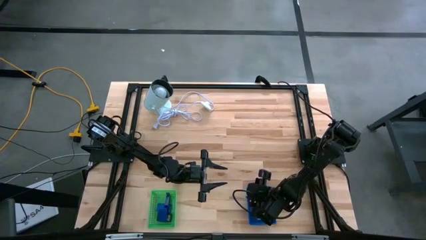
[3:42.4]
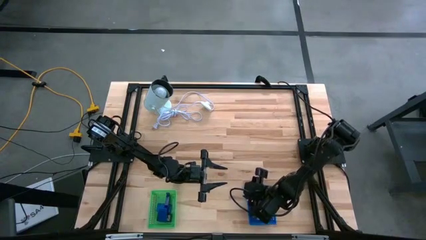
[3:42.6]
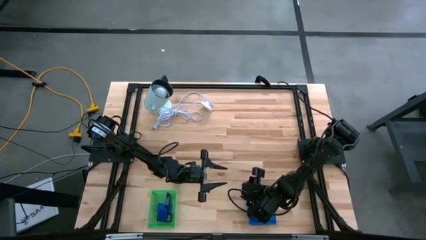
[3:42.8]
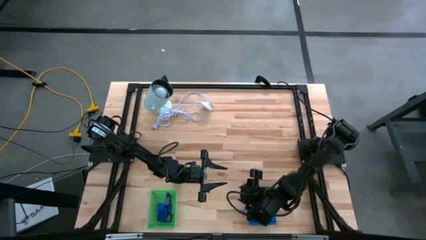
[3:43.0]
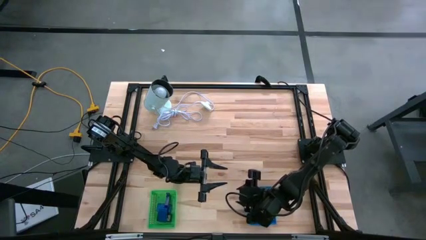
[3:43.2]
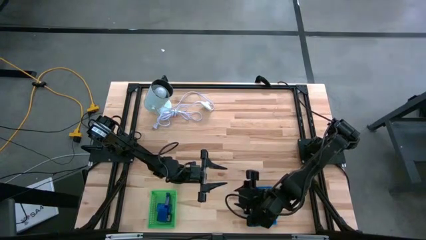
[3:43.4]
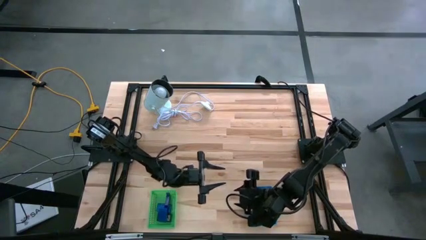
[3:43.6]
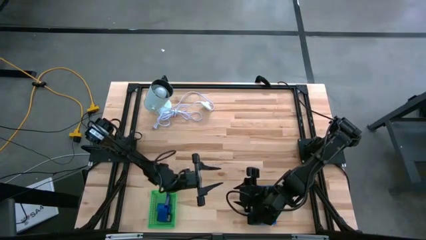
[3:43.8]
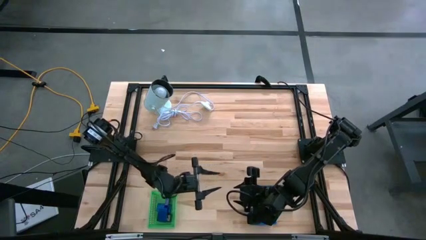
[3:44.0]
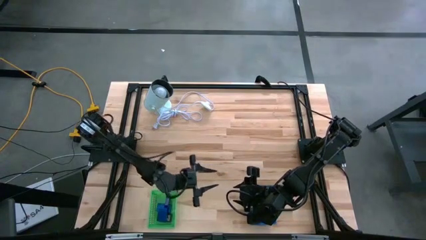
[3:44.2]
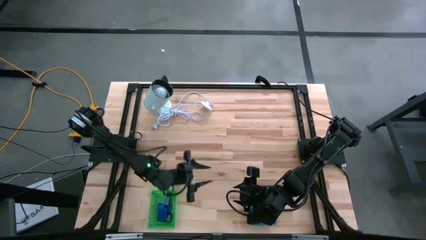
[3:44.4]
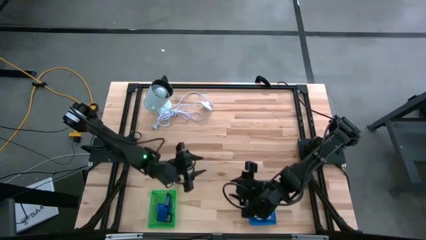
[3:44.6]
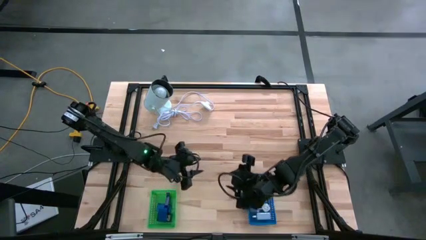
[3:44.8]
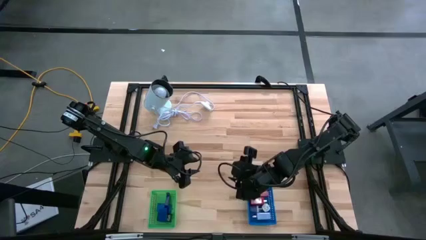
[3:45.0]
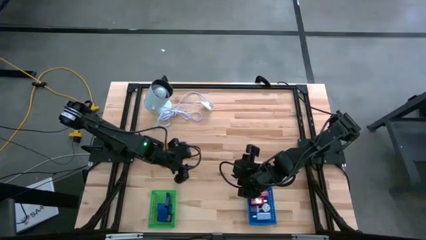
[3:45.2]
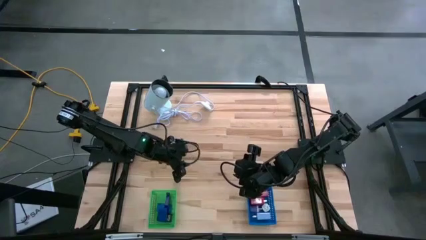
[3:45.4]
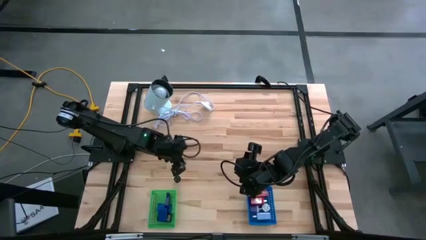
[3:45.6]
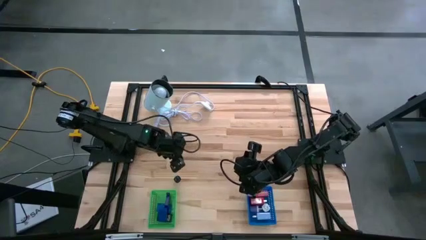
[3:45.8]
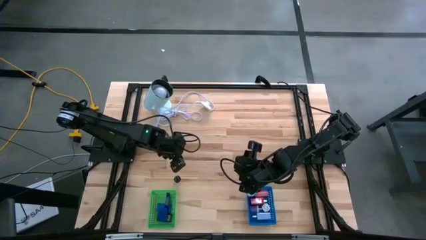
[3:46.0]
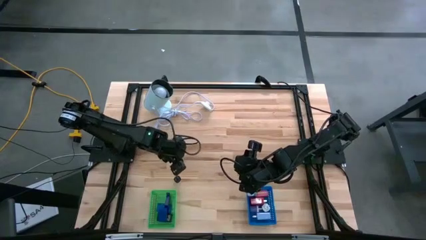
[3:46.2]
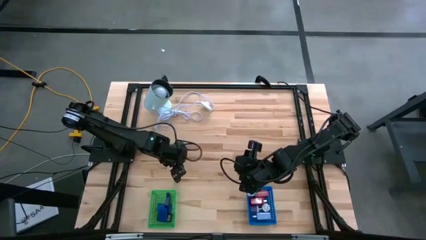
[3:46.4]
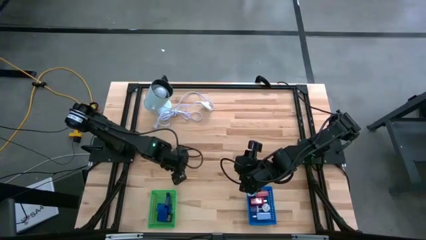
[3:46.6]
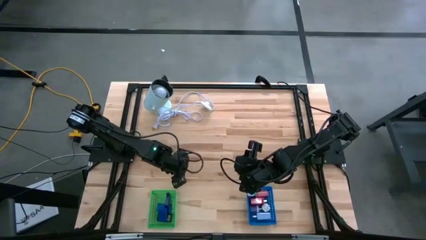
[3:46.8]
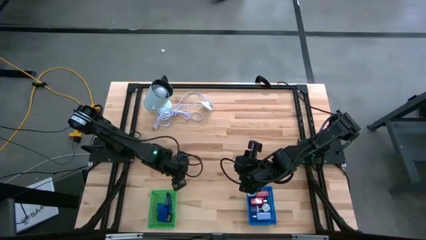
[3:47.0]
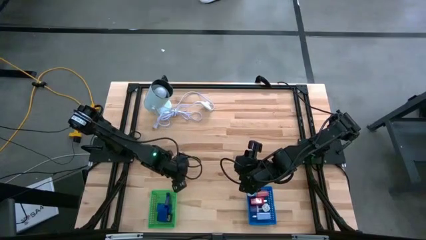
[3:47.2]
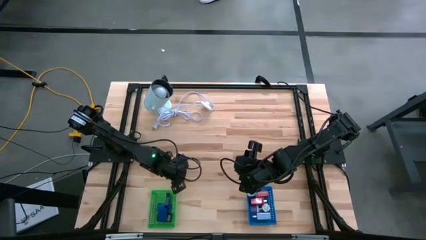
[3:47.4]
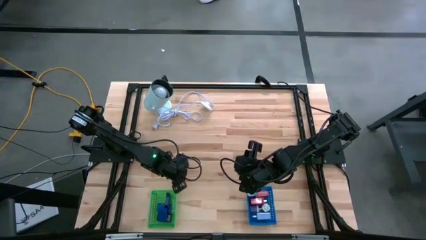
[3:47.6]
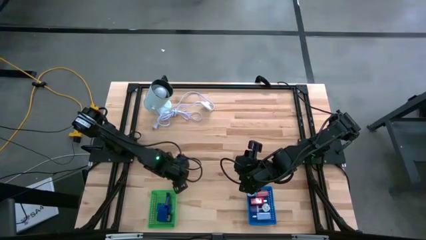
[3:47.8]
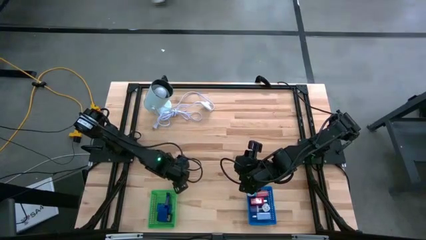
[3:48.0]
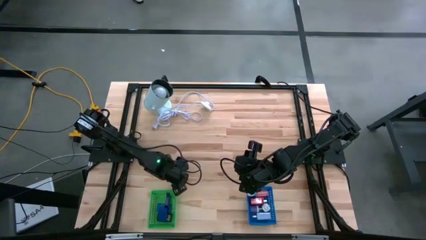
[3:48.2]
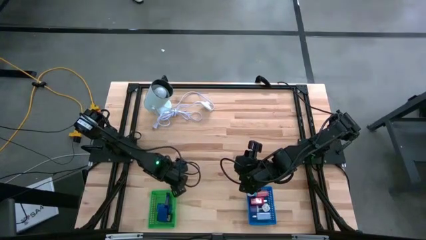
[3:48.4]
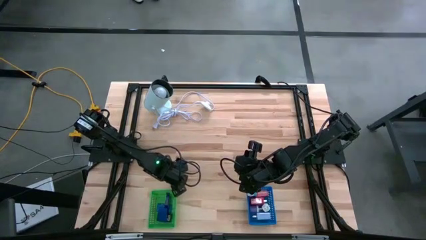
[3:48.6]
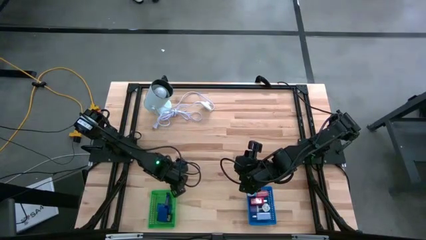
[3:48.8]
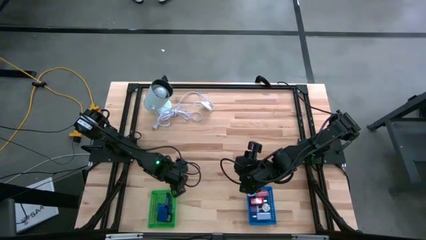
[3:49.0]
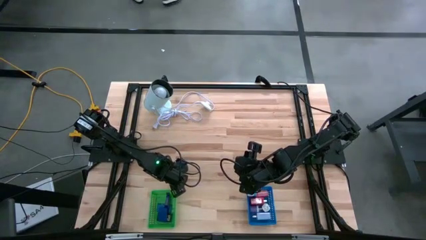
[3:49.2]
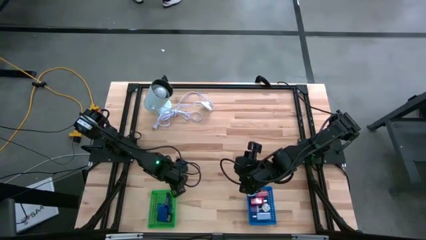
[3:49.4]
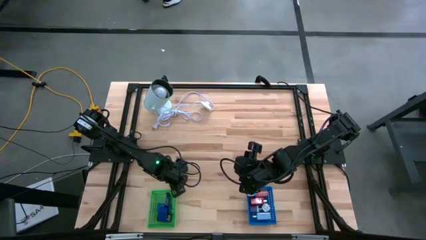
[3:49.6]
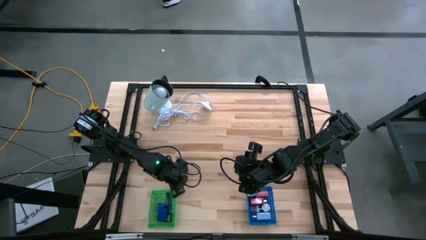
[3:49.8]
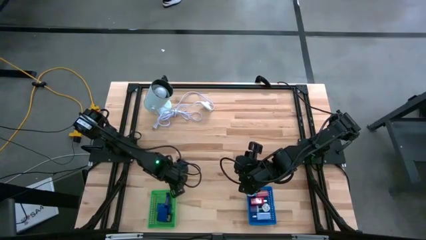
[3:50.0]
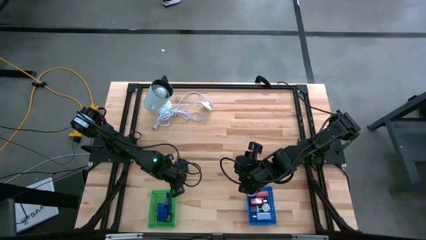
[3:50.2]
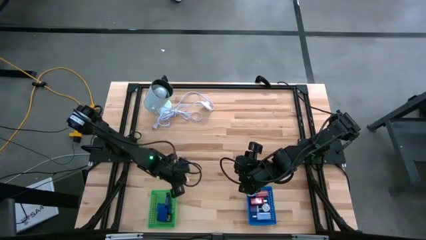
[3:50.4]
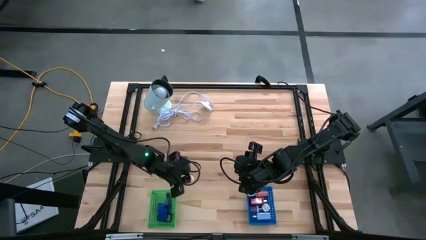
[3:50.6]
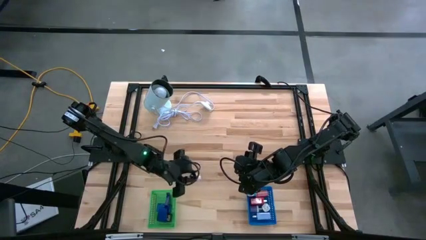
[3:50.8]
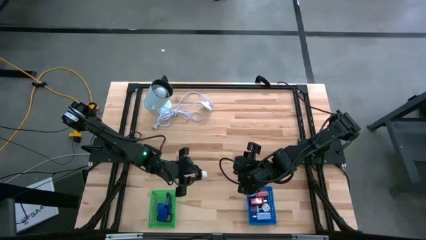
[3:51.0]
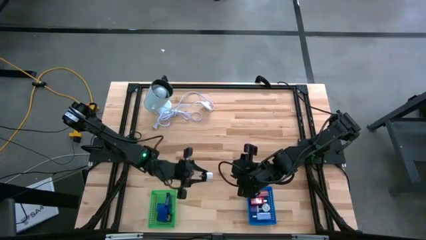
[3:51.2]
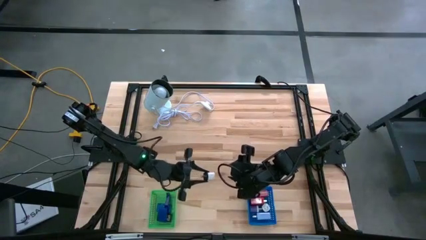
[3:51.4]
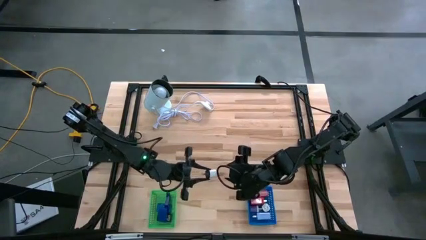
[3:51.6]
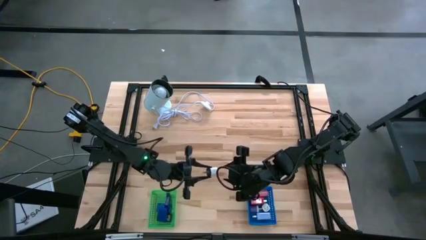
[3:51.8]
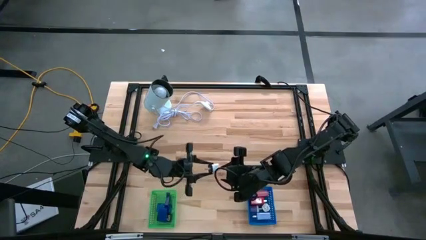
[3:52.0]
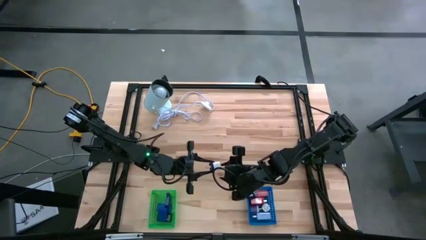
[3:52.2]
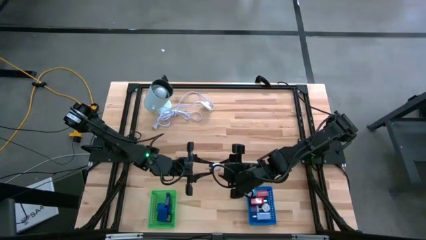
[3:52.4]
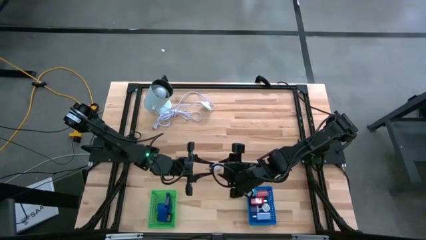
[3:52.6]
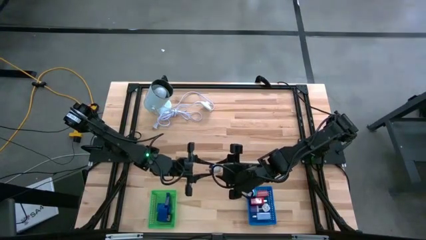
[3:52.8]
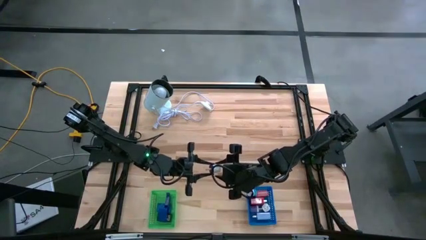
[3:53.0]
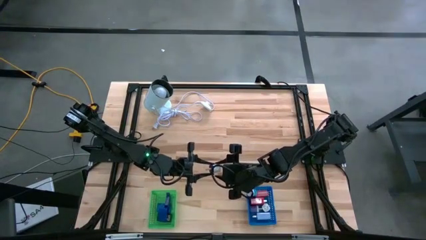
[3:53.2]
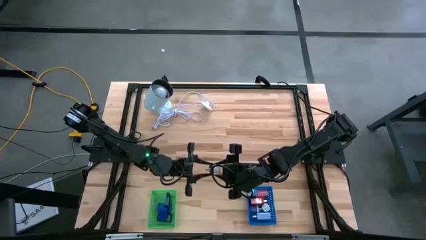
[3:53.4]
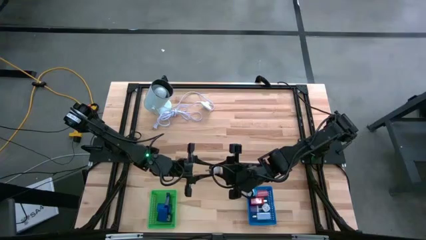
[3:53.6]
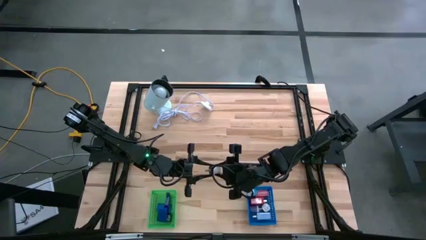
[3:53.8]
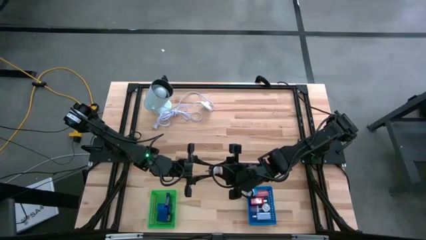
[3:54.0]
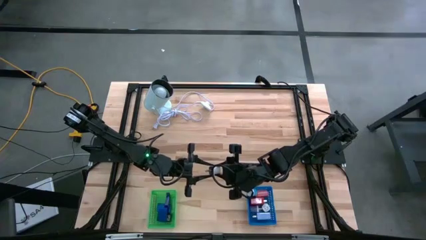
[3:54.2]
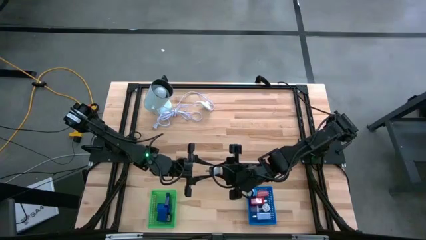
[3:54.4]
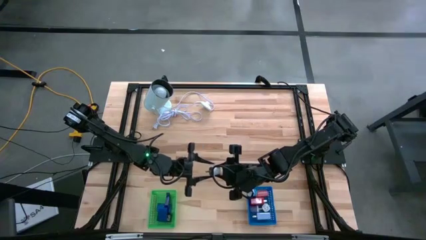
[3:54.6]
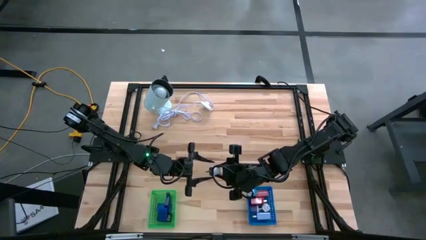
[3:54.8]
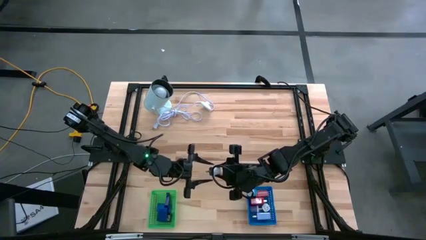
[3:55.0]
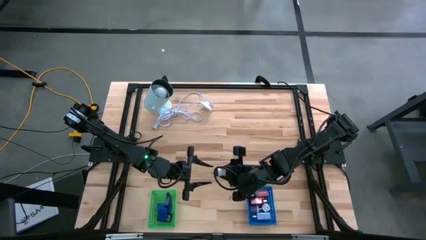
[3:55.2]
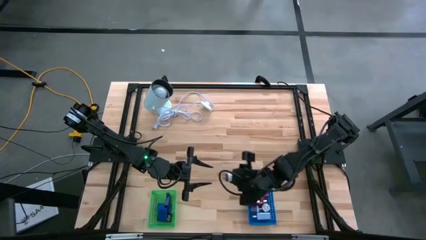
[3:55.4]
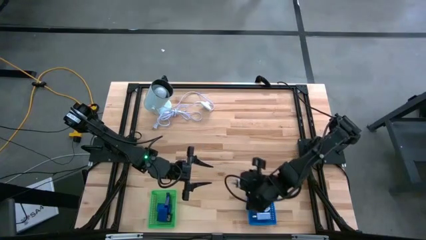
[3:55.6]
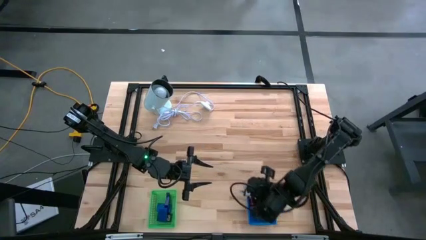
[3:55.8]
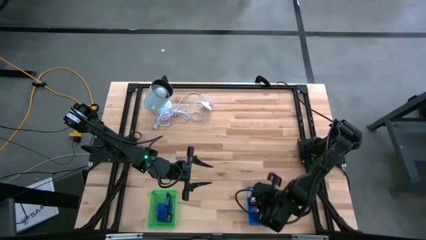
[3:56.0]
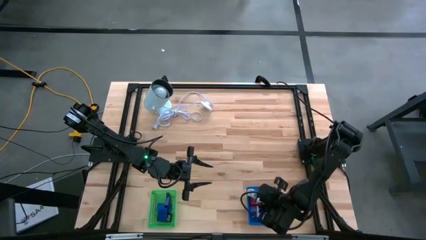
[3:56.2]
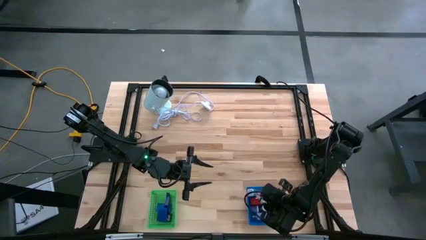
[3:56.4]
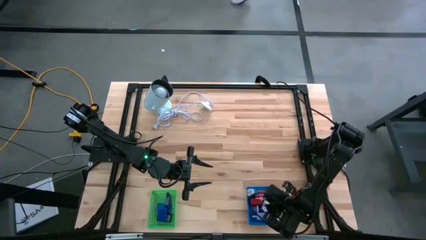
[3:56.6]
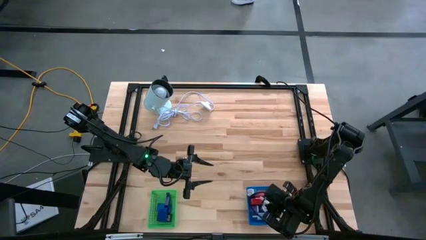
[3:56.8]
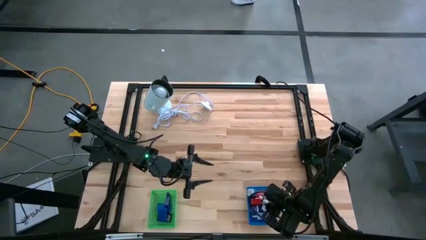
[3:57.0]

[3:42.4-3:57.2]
Task: Pick & Place Office items
Put the white black charger adapter into the blue bin

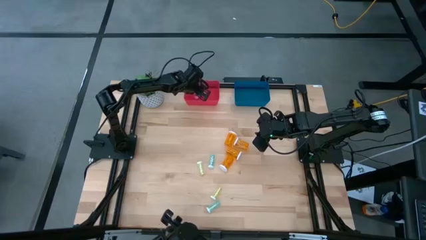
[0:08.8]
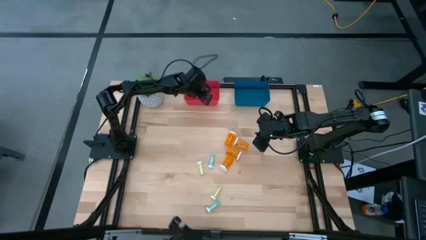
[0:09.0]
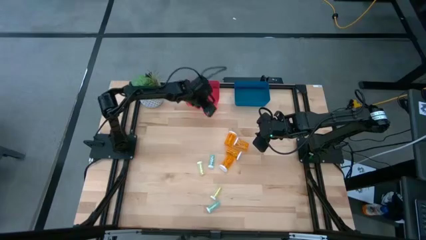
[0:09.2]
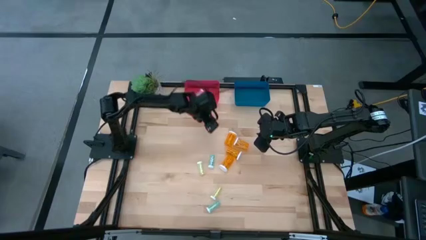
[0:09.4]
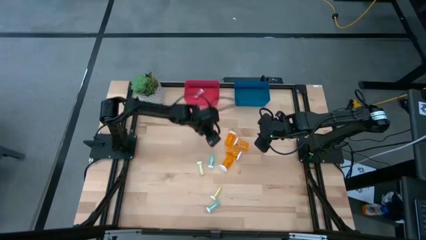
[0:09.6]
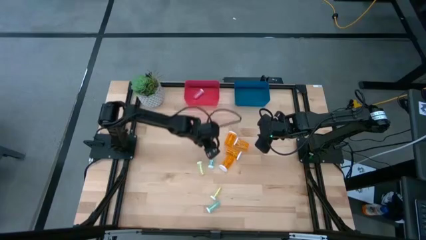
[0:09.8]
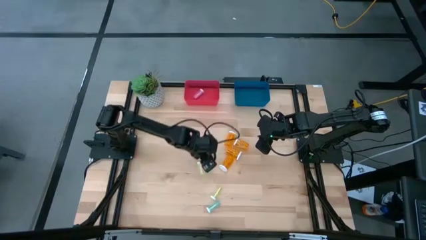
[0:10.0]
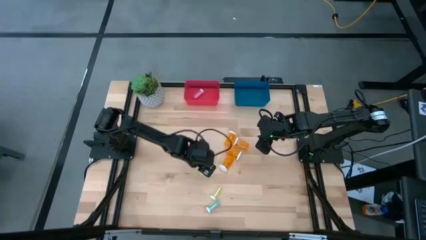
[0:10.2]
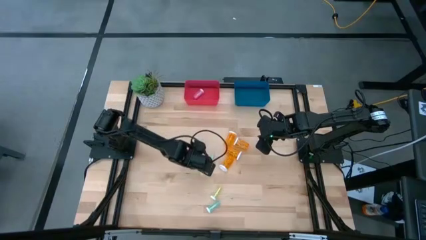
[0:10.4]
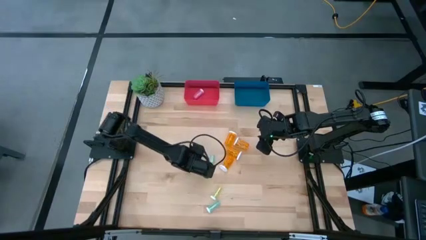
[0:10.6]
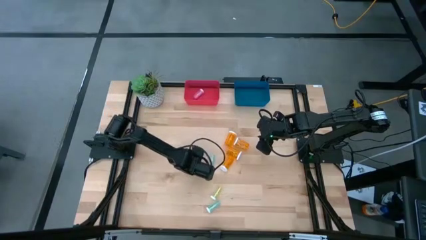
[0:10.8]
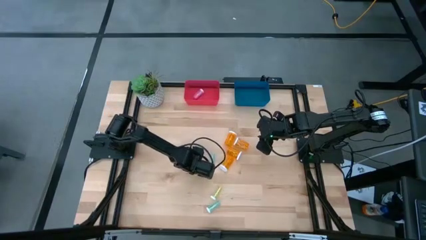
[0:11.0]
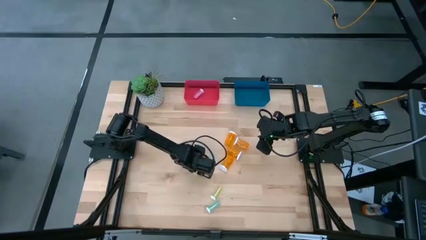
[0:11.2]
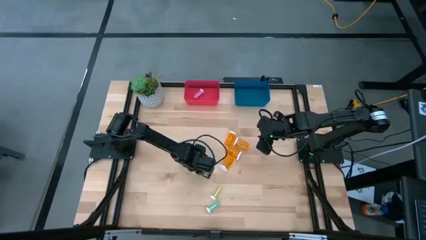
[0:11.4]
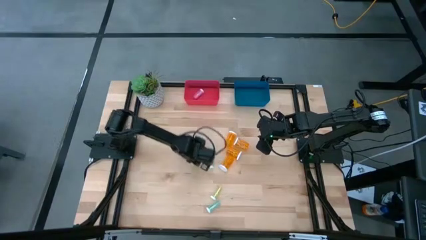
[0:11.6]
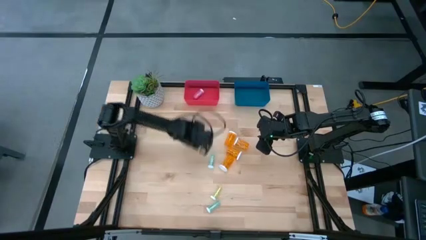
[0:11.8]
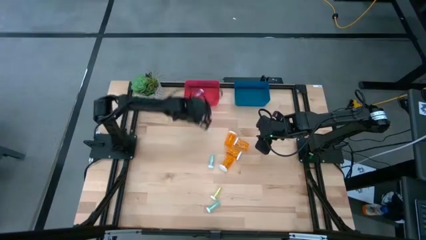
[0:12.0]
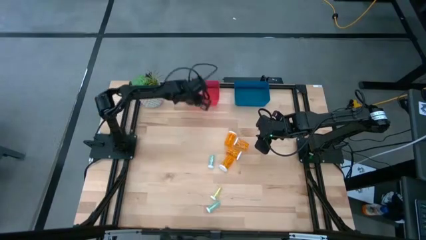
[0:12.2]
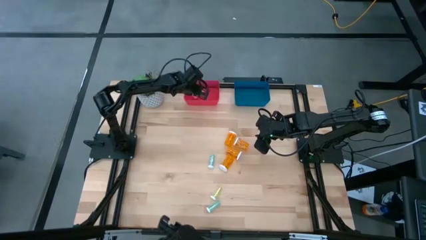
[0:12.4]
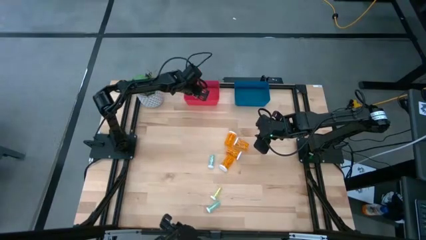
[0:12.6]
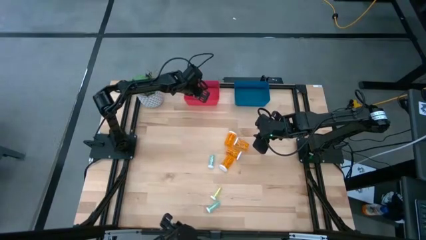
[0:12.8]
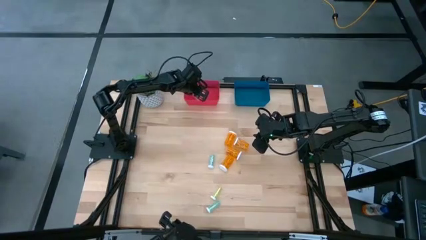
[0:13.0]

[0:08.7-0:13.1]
Task: Pick and place medicine bottles into bin by pill shape (circle, oval)
Put the yellow pill bottle into the red bin
